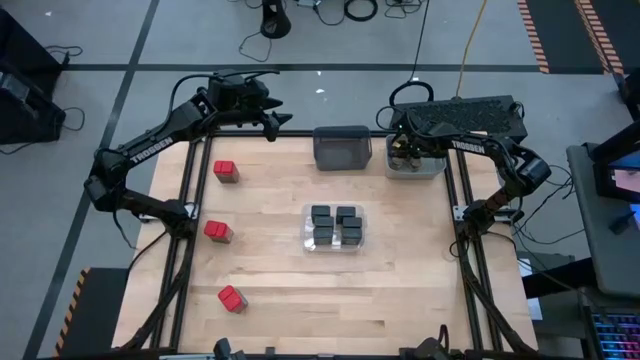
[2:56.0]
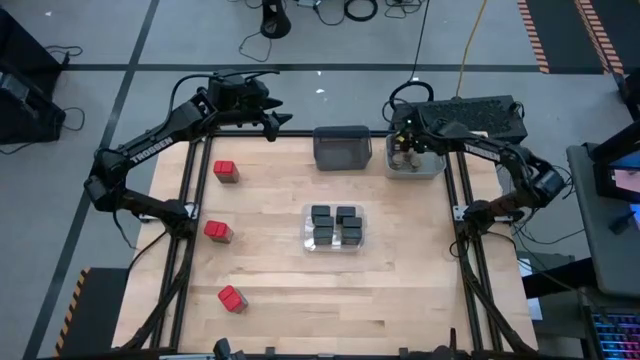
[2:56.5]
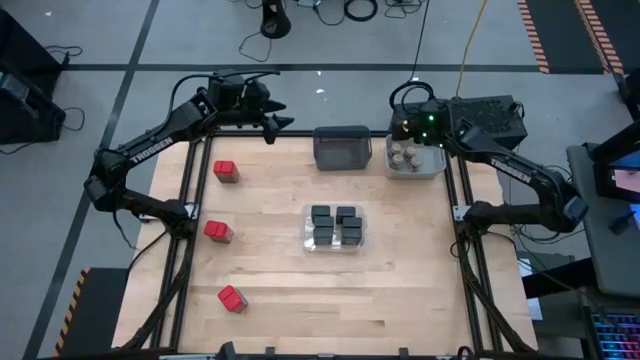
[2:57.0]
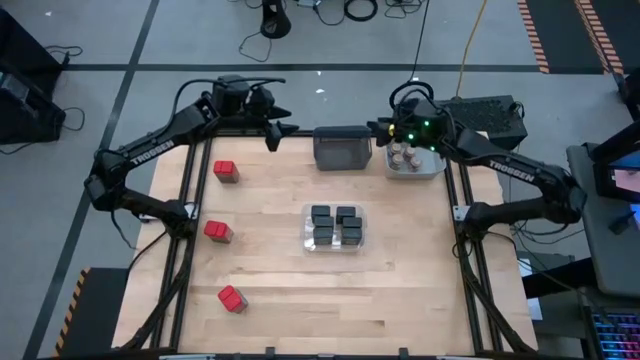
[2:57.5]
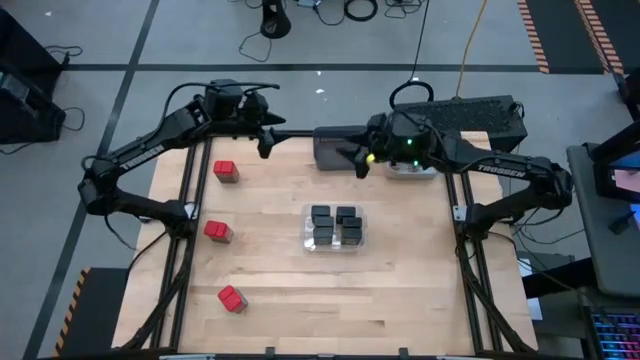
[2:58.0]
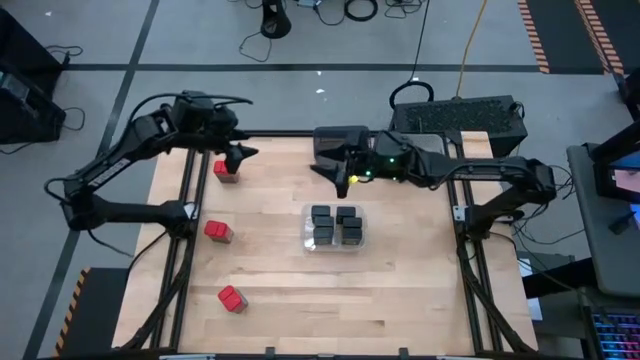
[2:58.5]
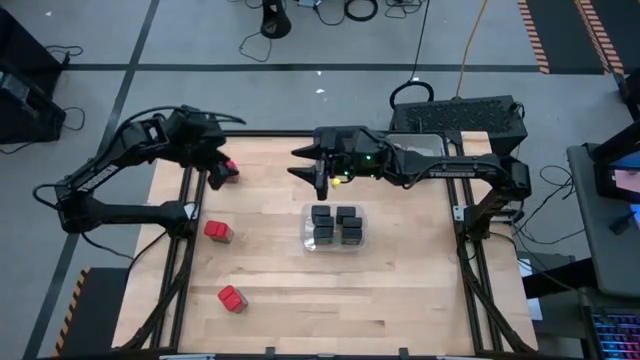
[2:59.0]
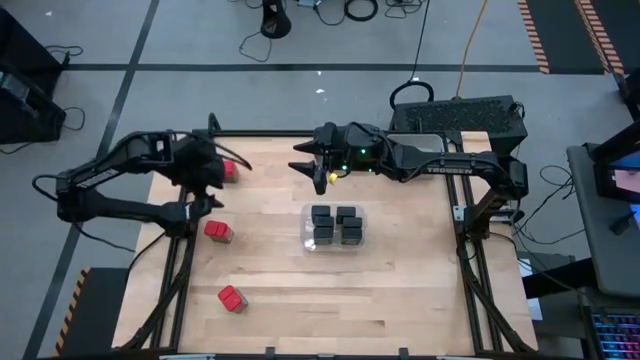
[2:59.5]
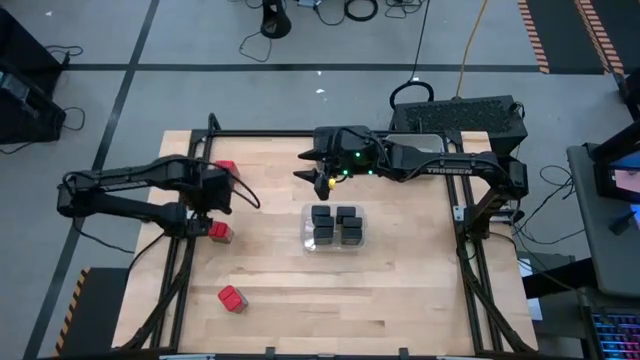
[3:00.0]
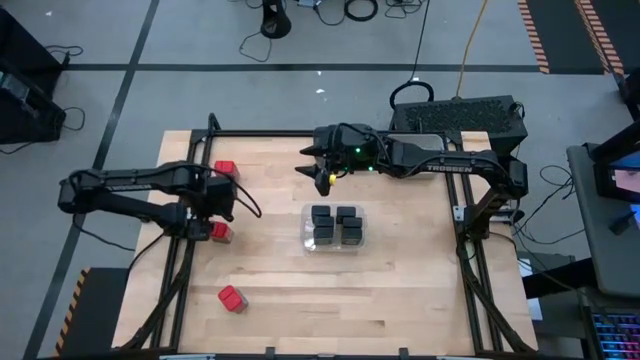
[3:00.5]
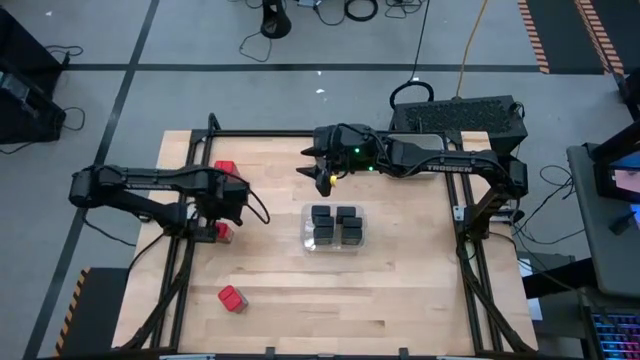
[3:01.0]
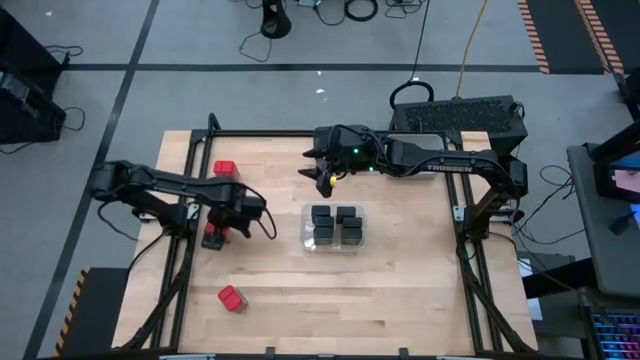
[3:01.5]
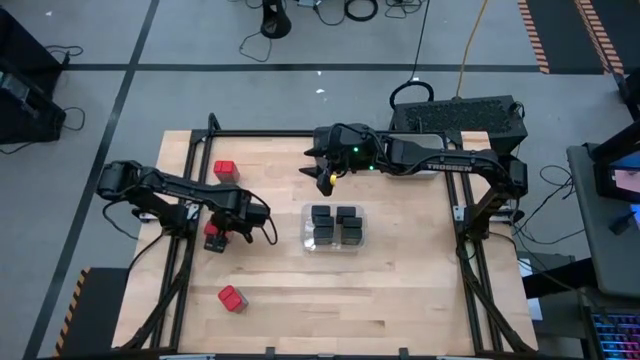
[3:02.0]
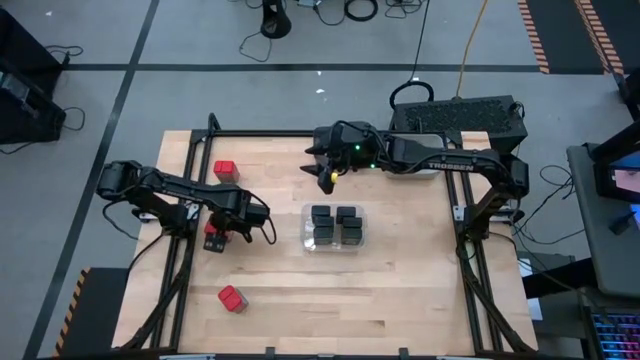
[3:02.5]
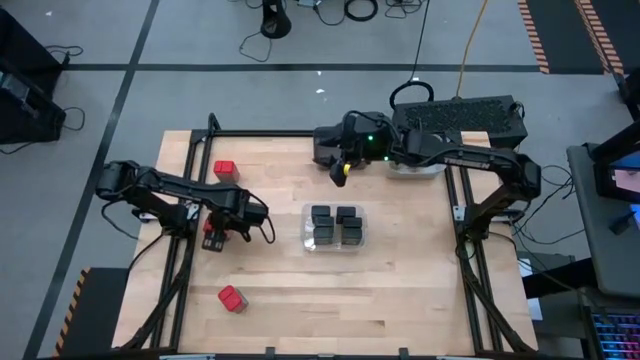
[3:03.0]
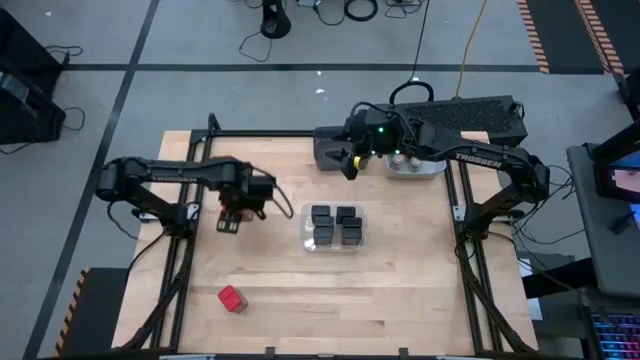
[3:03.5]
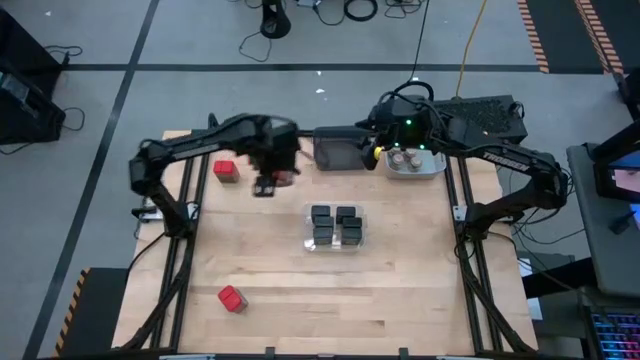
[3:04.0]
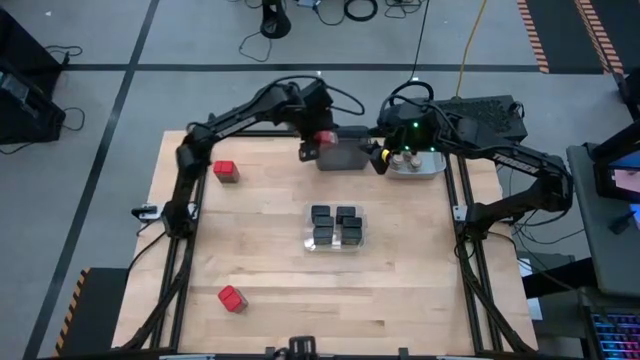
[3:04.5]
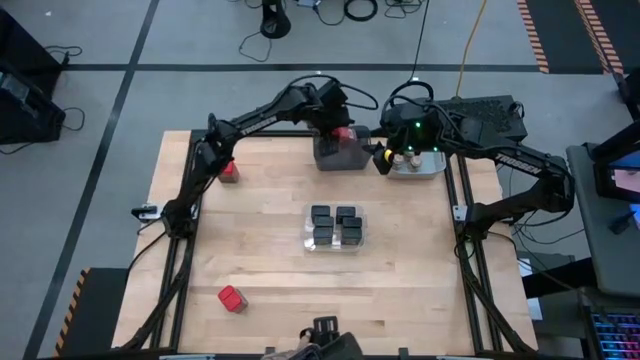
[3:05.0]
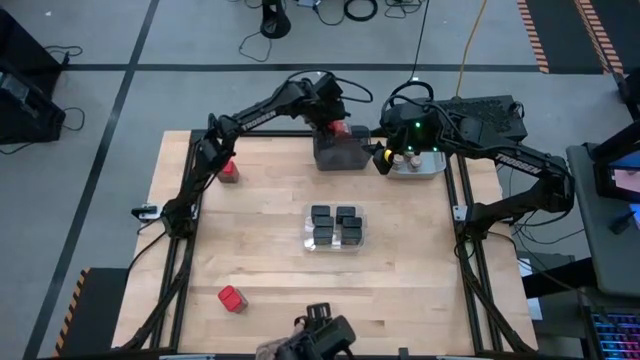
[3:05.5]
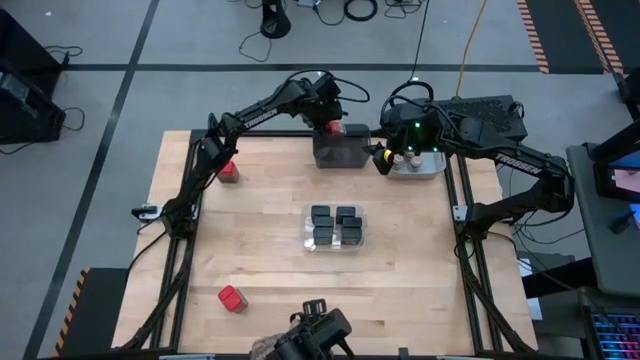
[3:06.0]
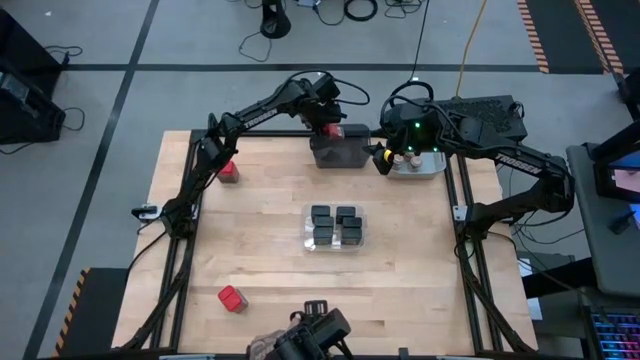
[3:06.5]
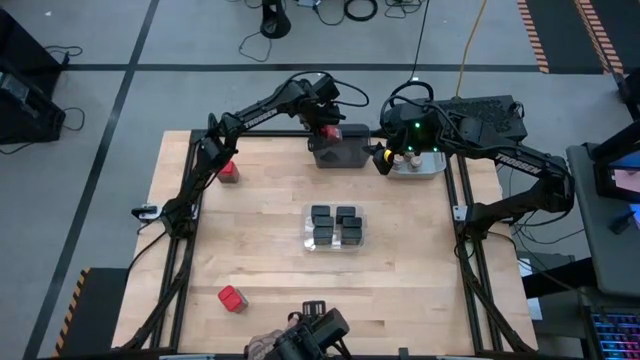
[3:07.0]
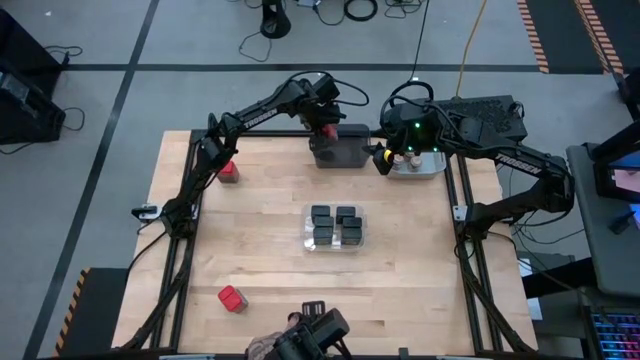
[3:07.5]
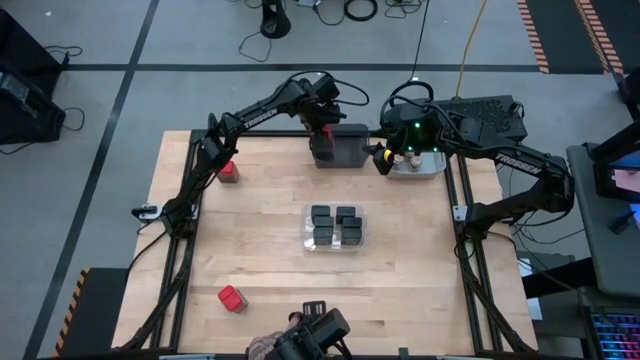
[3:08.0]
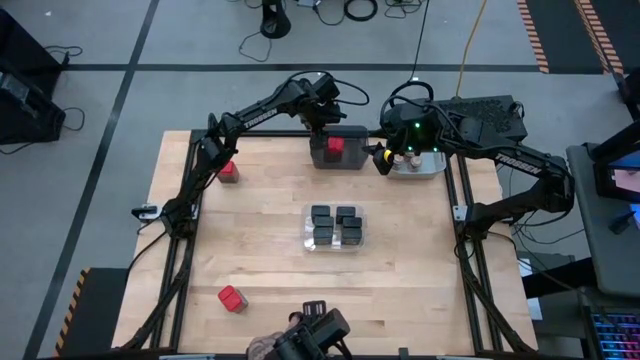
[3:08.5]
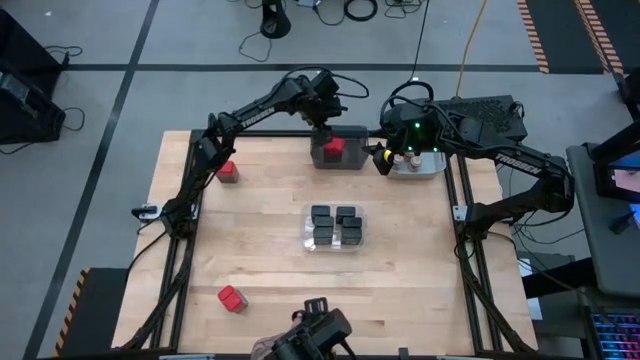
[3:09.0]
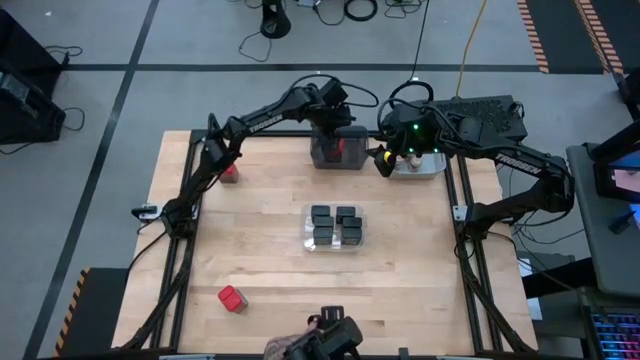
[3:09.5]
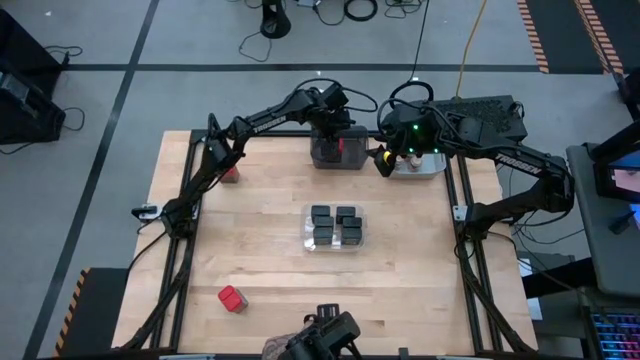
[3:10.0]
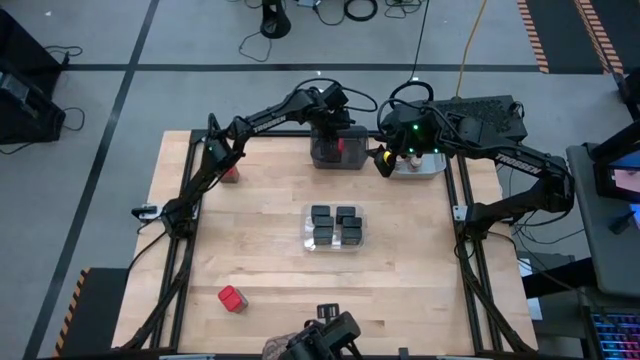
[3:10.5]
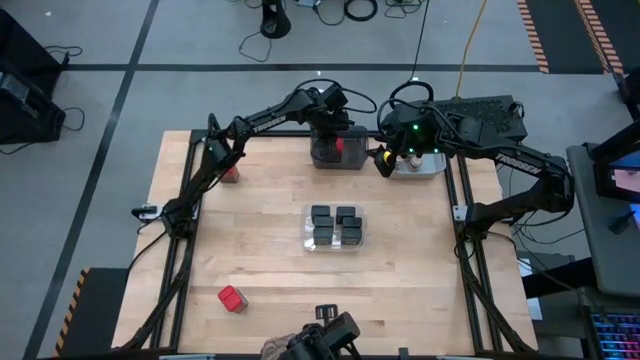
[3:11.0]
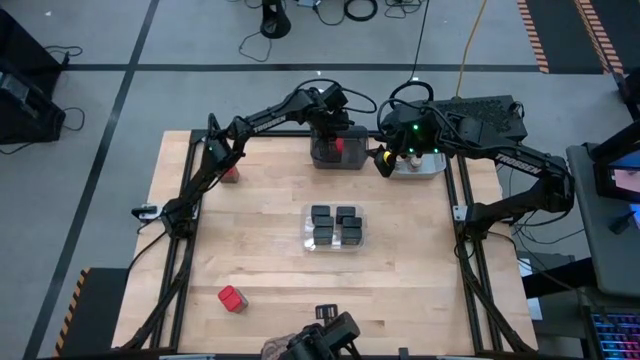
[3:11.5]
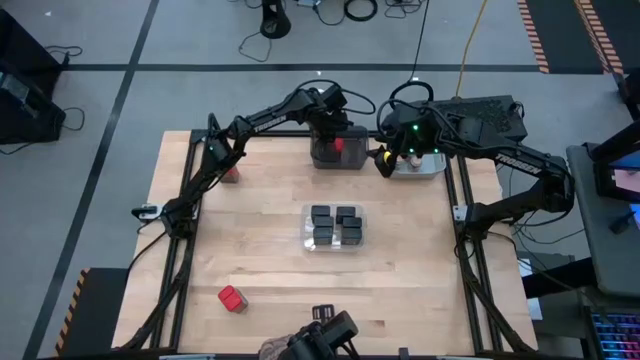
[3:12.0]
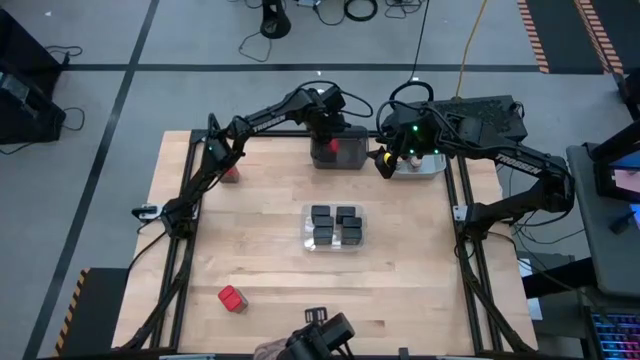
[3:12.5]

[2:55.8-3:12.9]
Task: Sort spices by type
Put the red seasoning can into the black bin

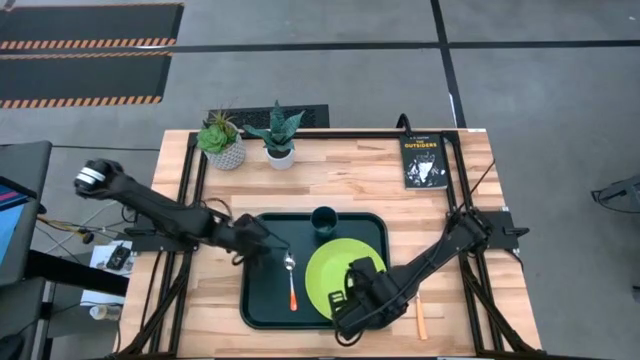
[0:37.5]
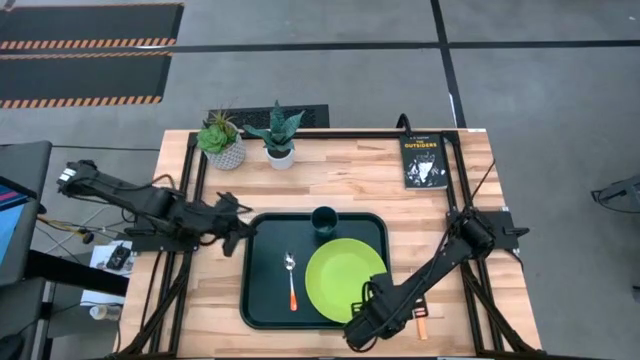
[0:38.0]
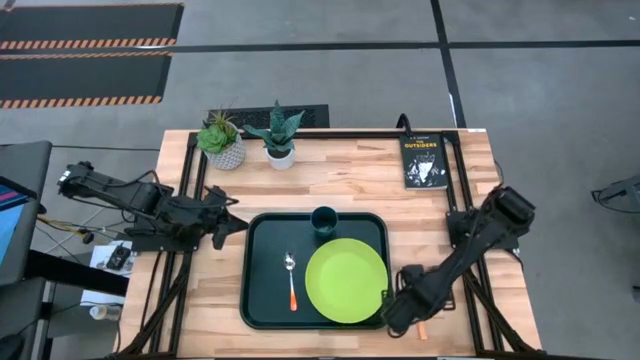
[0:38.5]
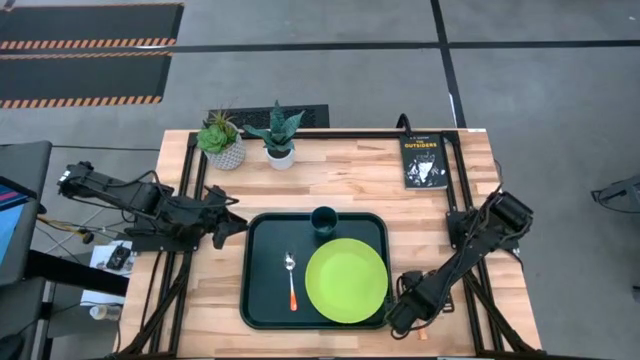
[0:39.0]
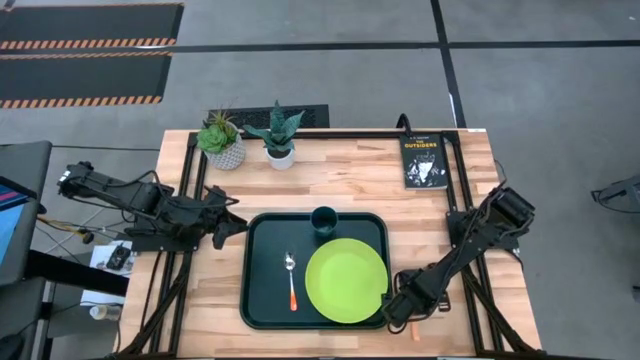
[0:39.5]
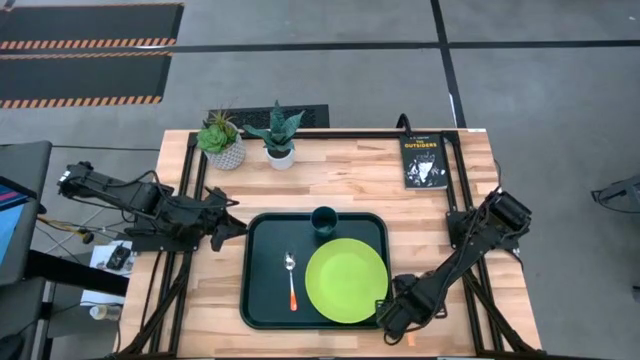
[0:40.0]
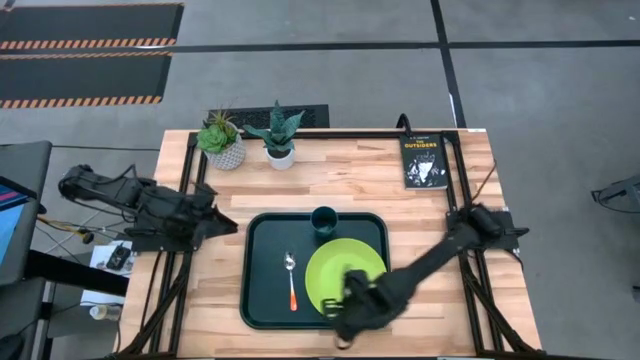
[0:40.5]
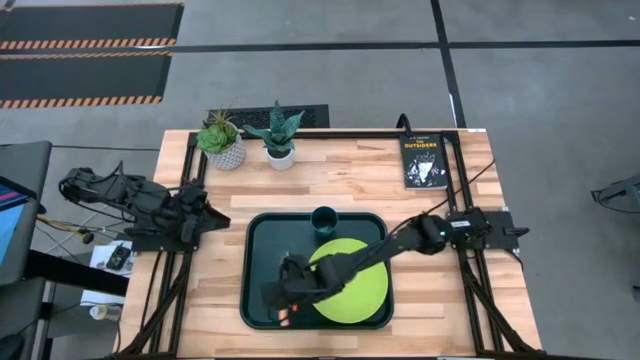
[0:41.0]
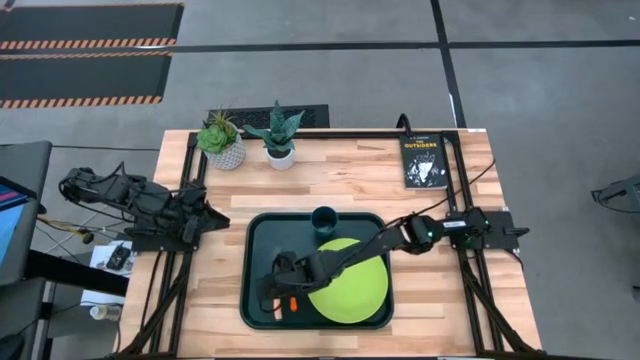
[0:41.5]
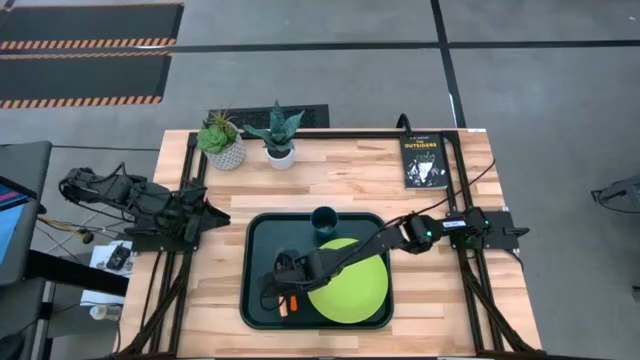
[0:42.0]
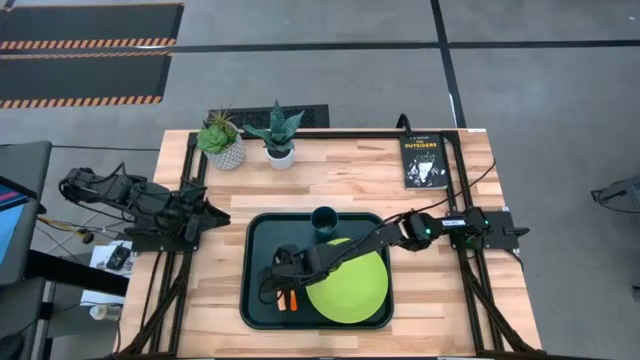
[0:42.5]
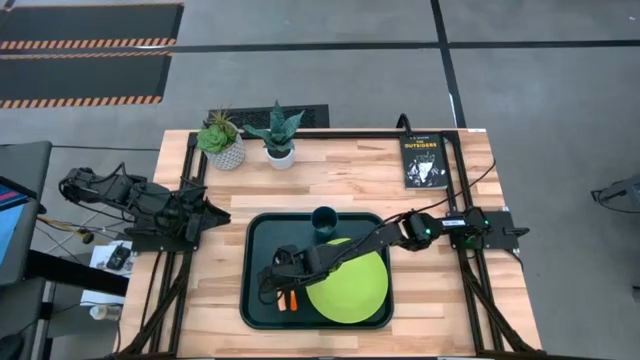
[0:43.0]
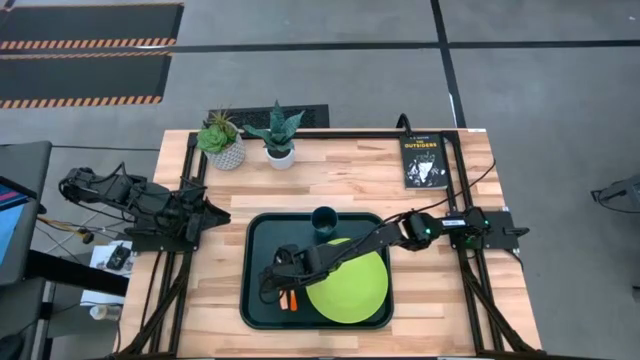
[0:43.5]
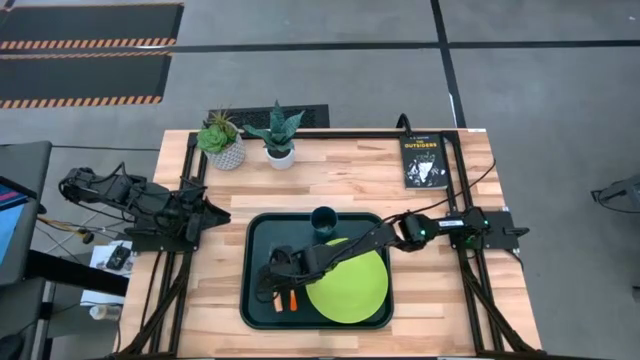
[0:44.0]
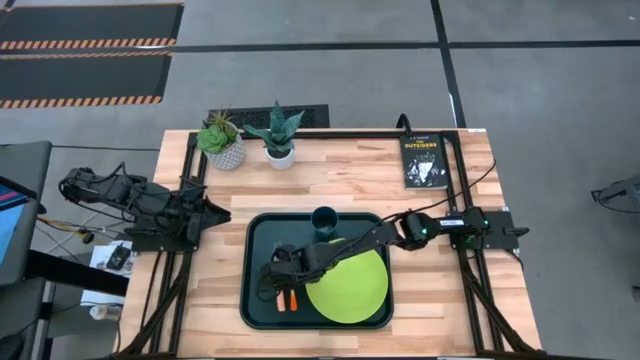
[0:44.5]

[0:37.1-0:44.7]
Task: Pick and place plate/cup/fork/spoon on tray
Put the light orange fork on the black tray to the left of the orange spoon
